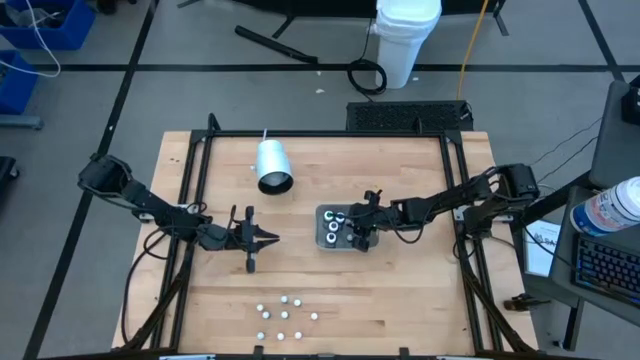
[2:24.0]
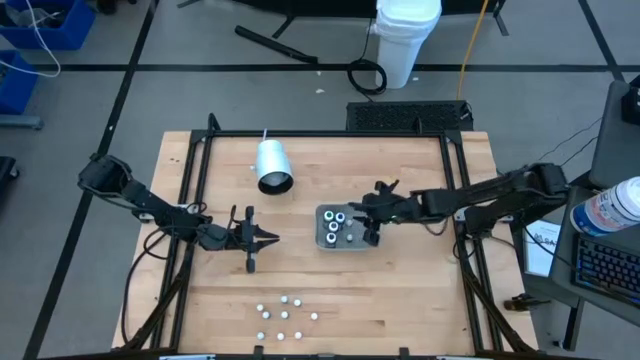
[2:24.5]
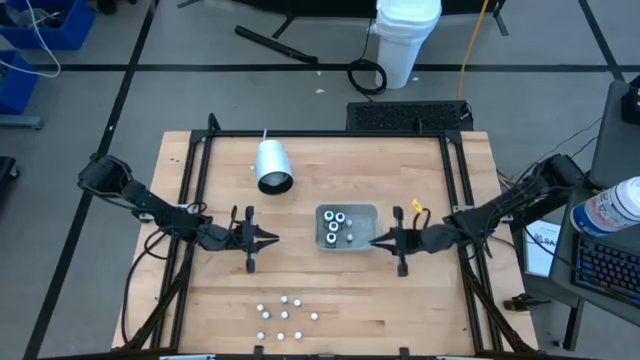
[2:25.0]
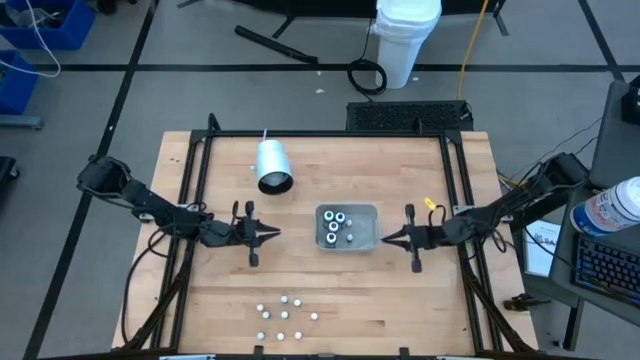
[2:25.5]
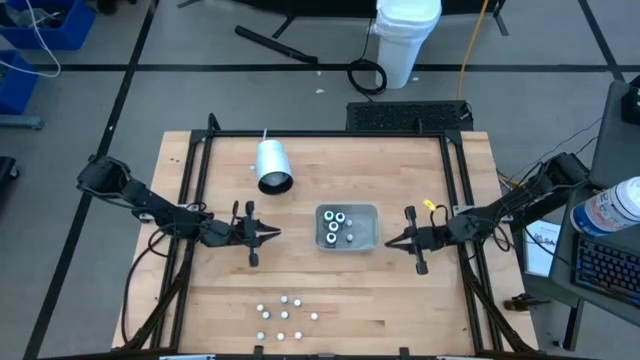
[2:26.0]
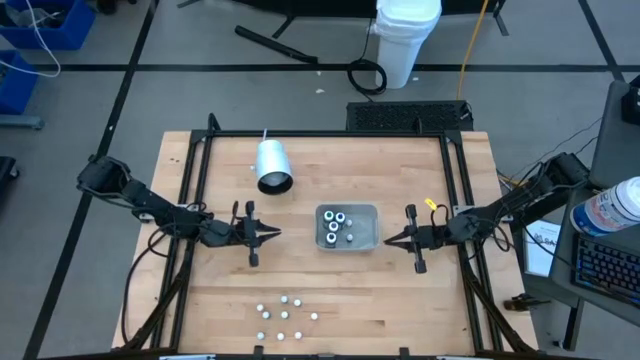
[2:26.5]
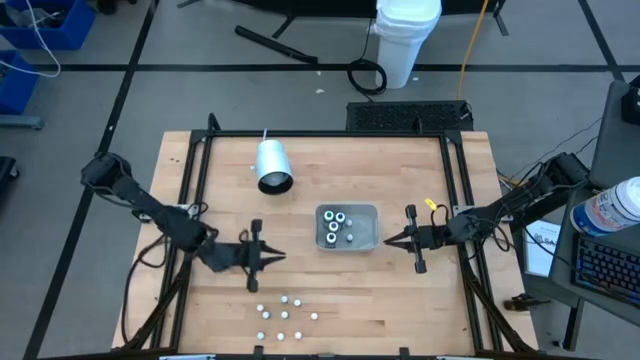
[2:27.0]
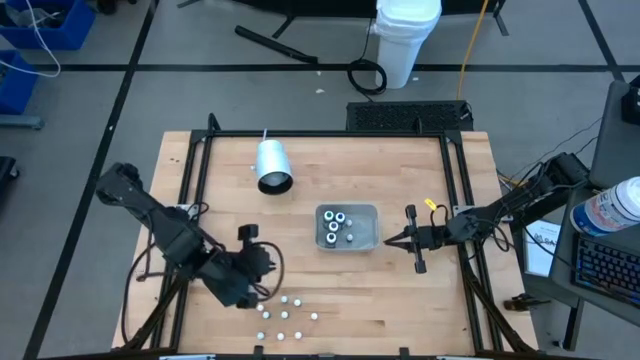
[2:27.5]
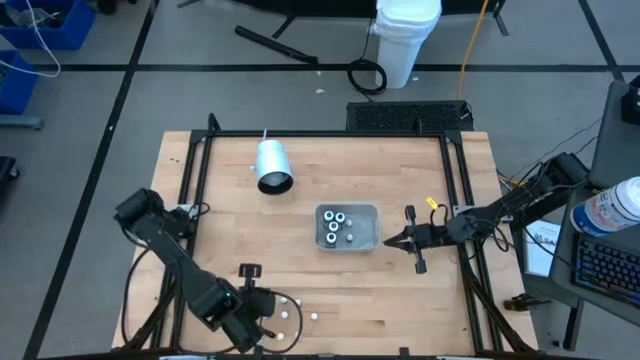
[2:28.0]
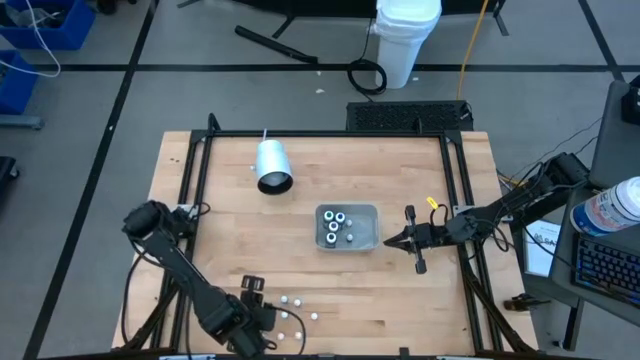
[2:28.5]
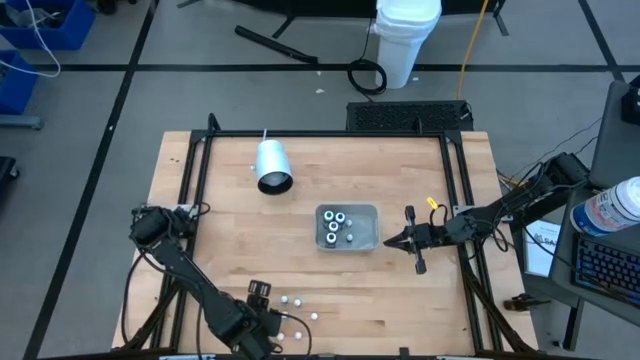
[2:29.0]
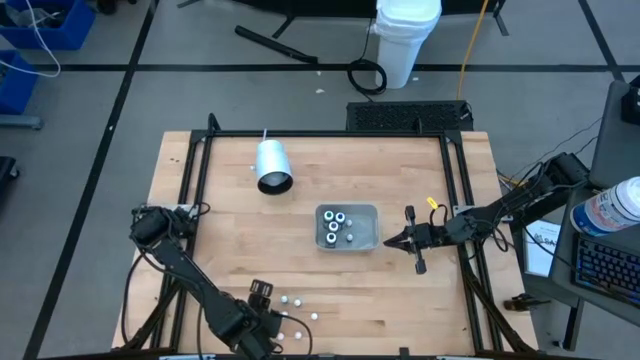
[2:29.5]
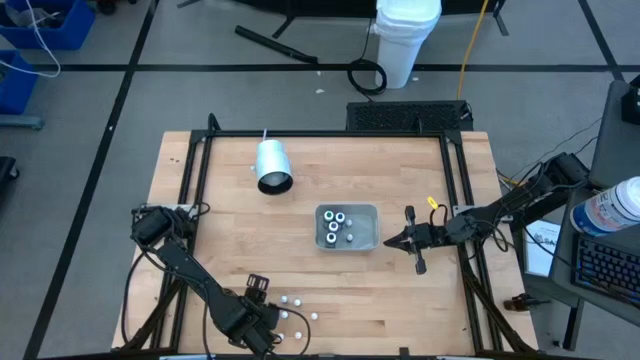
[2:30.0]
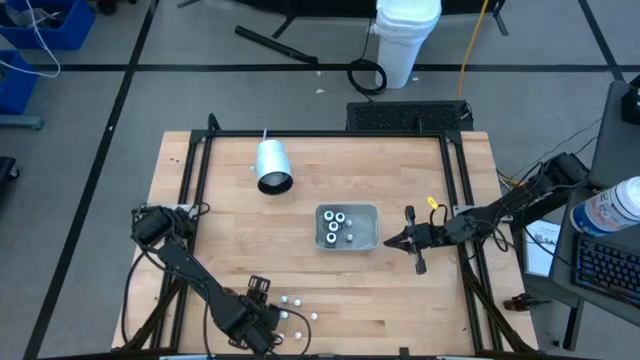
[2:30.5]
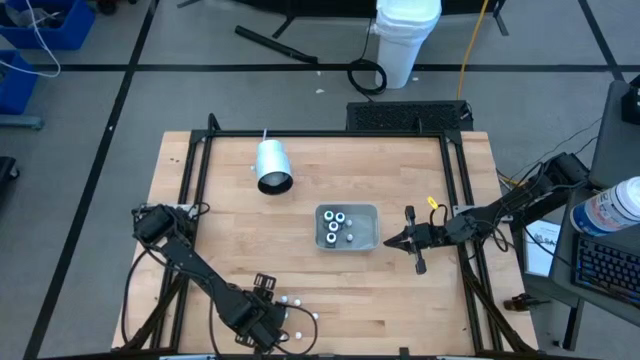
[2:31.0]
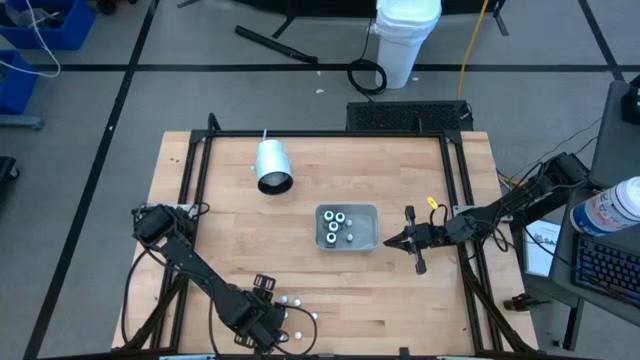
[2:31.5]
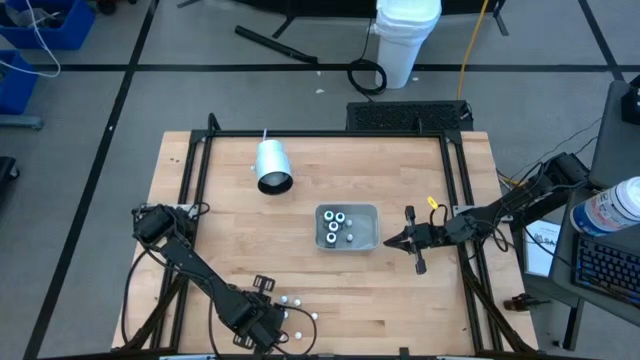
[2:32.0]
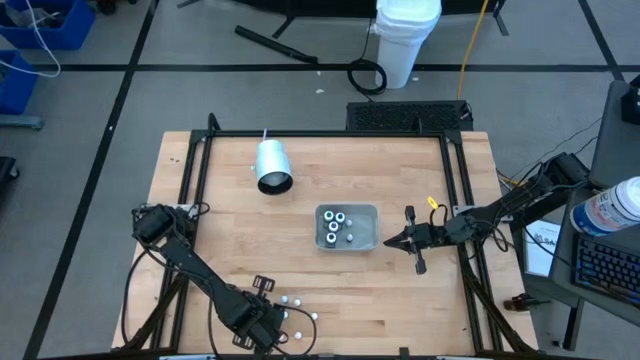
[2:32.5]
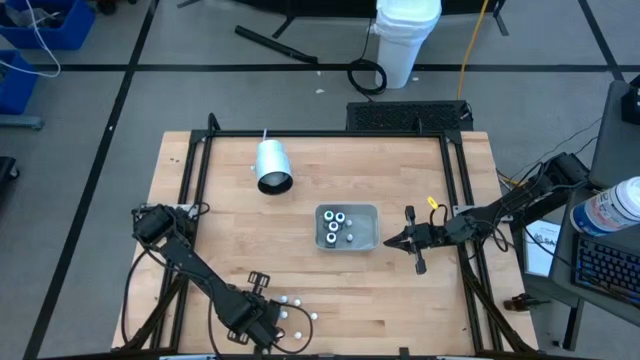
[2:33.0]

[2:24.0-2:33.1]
Task: Pick & Place food coloring
Put the top left small orange food coloring bottle into the white bin

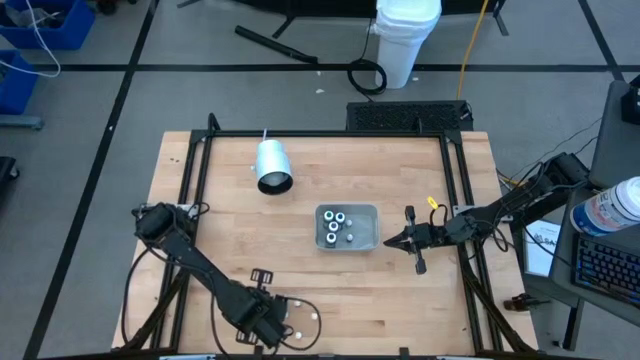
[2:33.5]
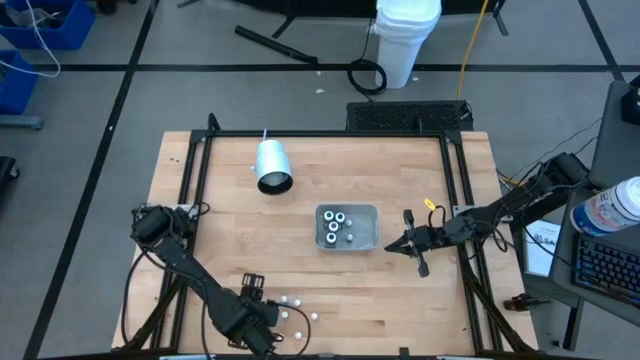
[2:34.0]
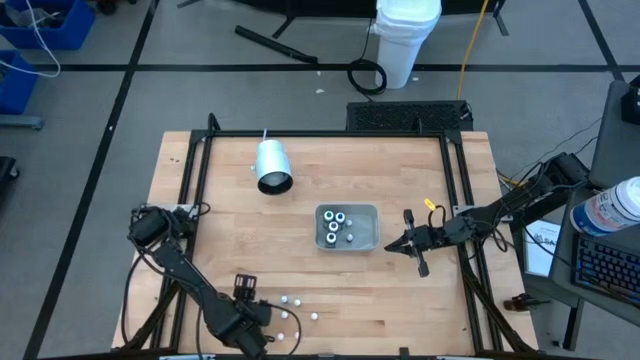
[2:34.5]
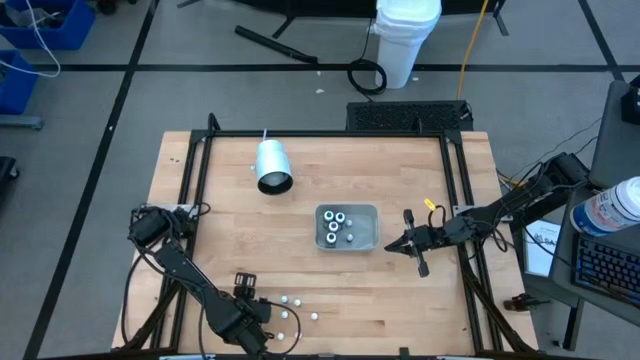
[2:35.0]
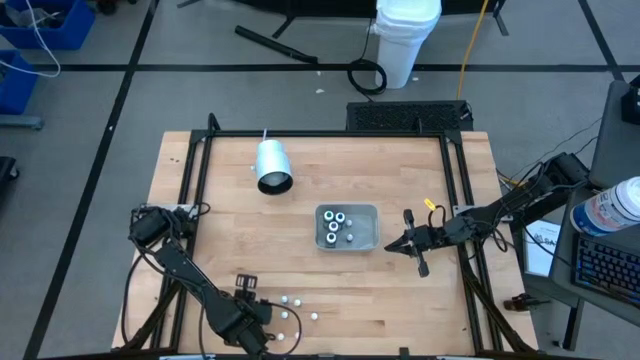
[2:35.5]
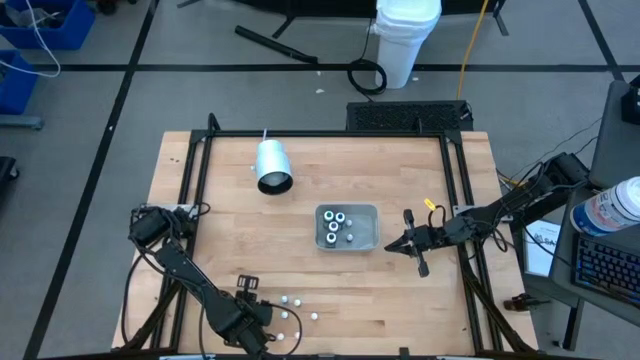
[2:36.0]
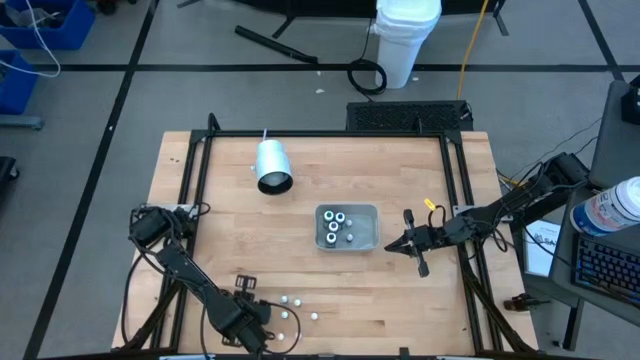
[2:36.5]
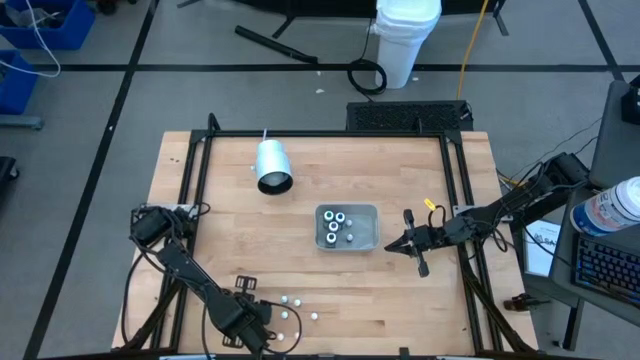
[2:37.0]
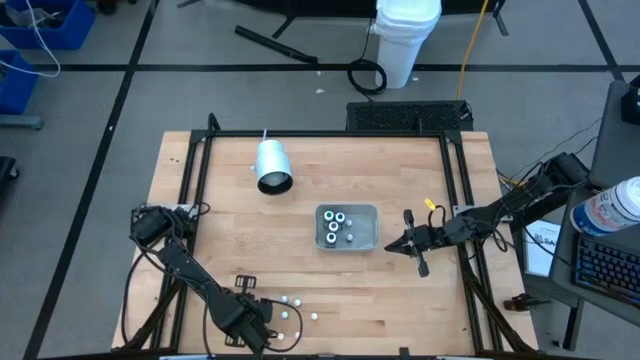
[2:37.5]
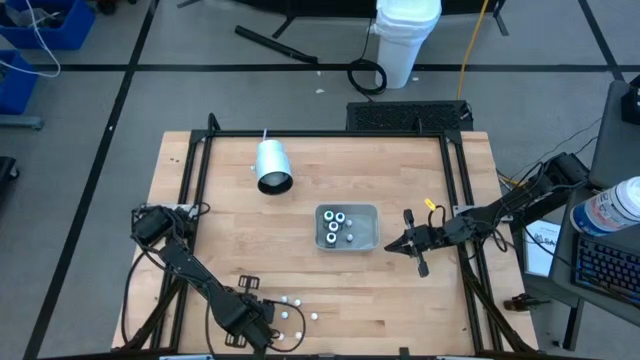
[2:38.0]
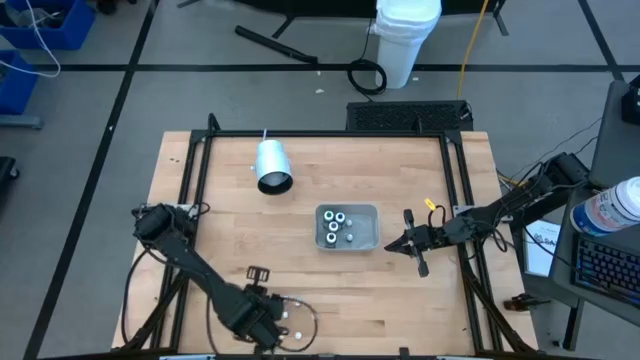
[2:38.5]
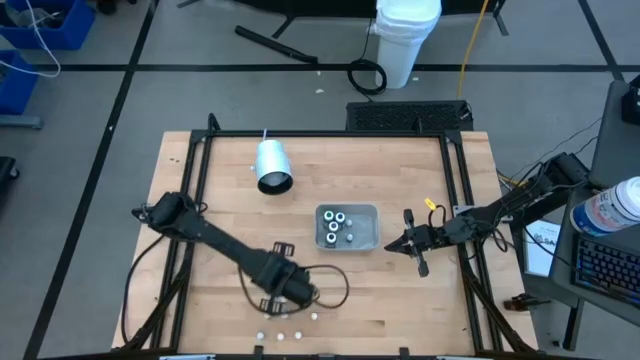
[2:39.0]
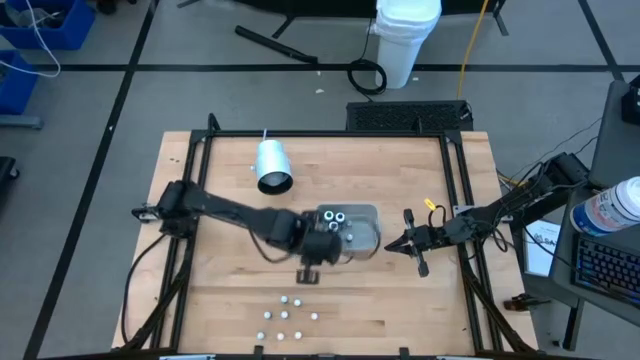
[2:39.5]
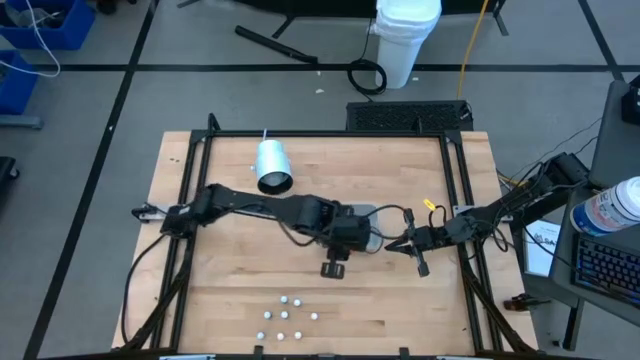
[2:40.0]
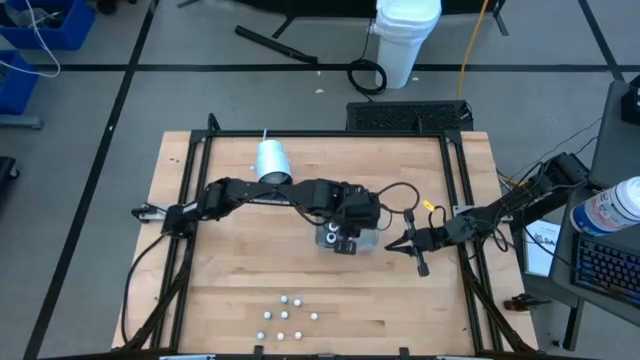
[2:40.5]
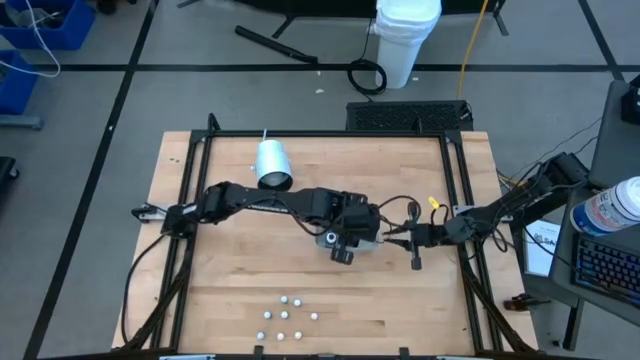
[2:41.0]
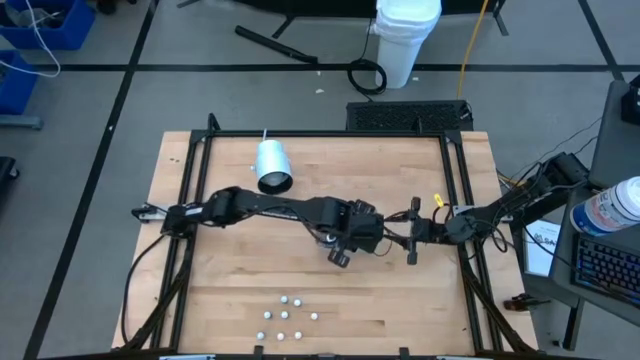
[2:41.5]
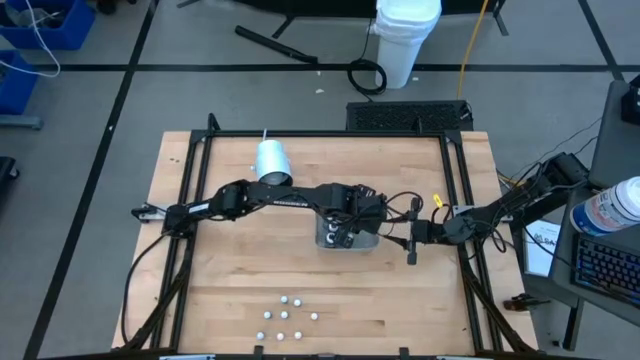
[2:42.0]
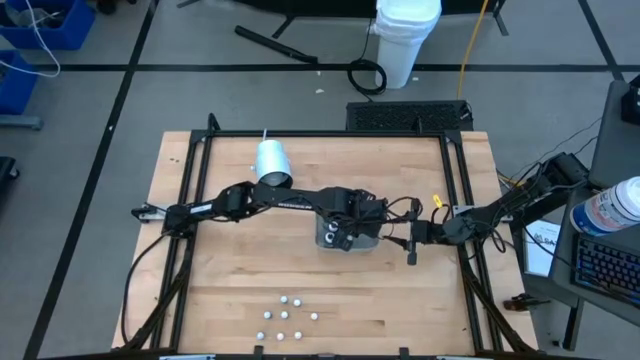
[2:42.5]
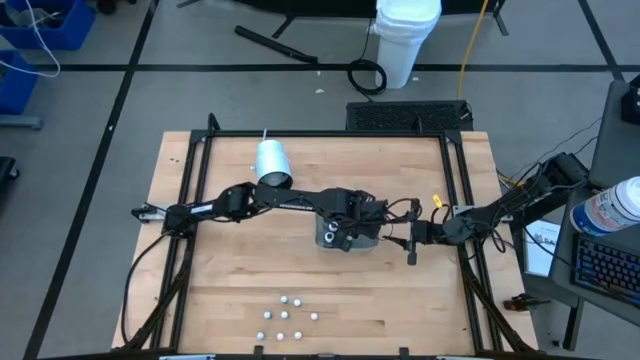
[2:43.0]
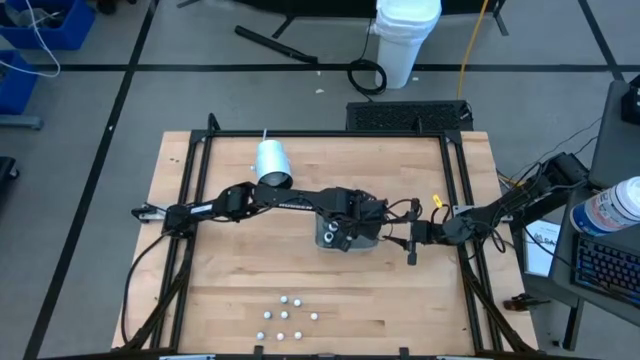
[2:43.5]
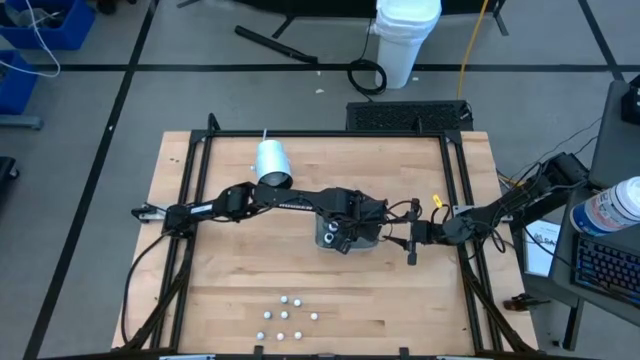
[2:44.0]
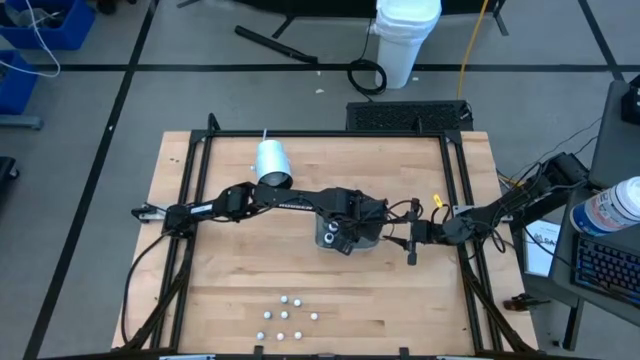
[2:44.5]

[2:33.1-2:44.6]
Put the top left small orange food coloring bottle into the white bin

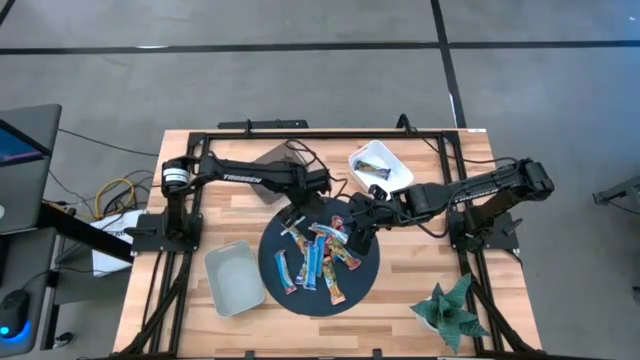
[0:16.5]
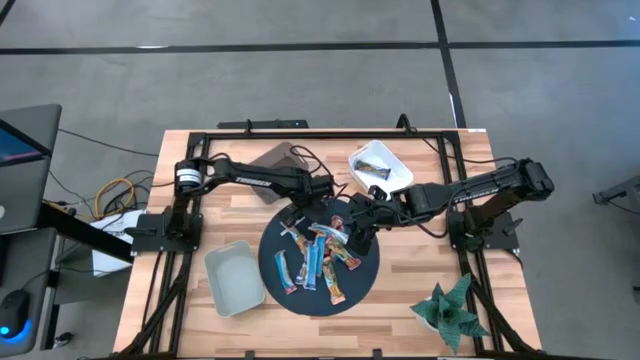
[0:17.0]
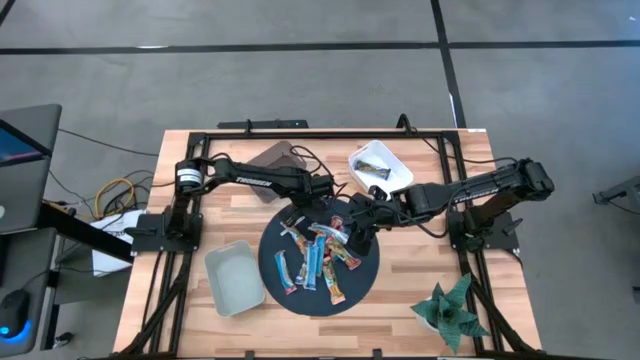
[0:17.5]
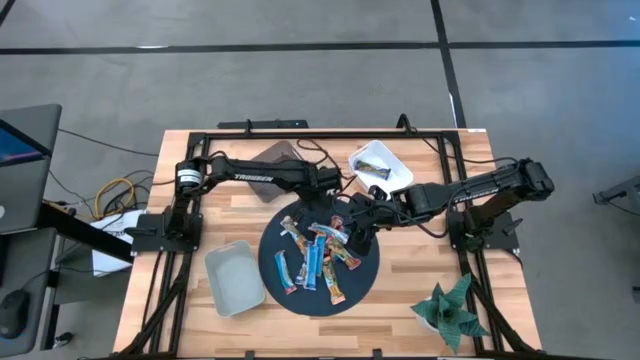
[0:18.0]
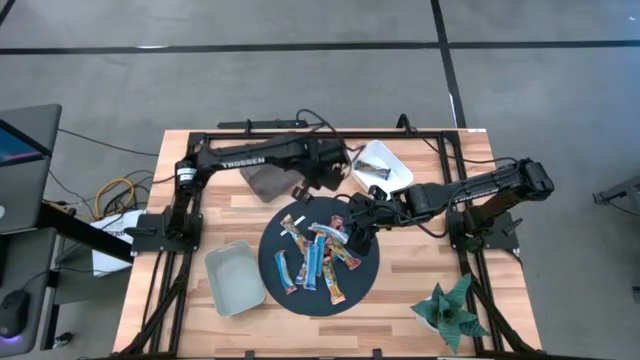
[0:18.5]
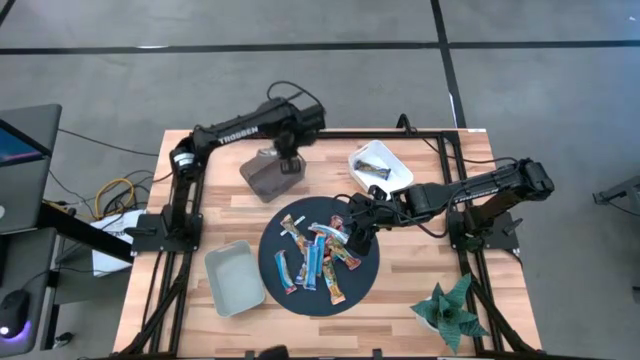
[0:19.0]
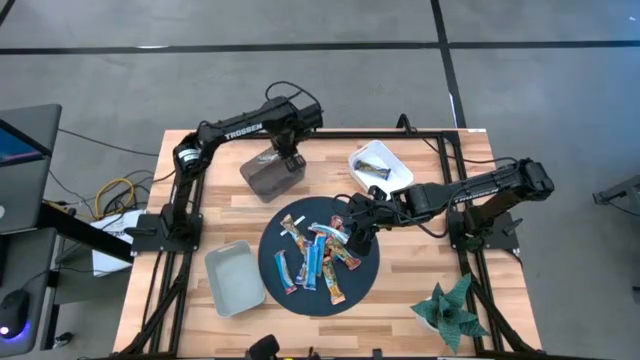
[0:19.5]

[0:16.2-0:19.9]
Task: Pick and place Granola Bars by type
Put the yellow granola bar into the black bin
